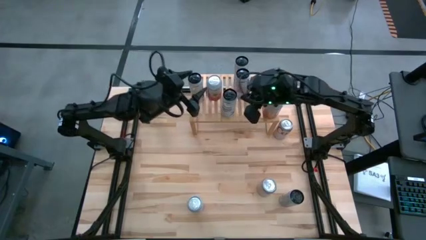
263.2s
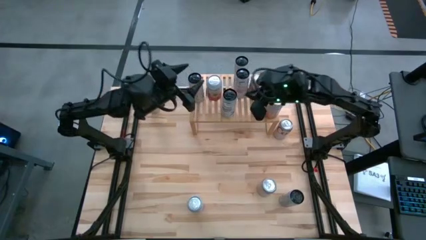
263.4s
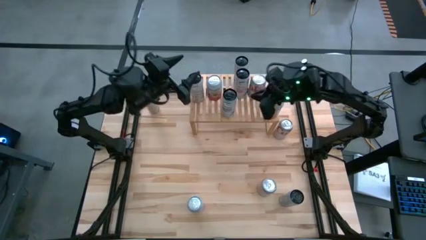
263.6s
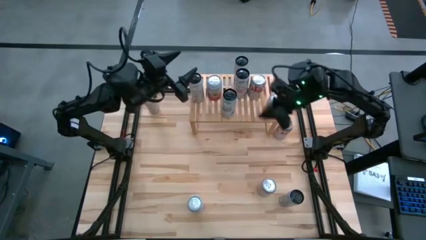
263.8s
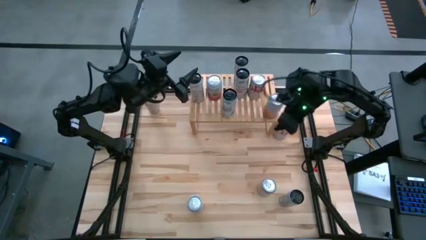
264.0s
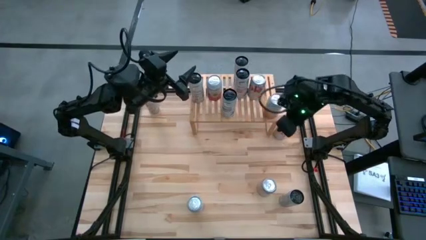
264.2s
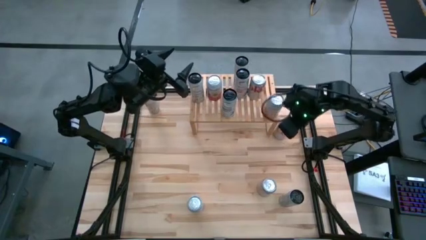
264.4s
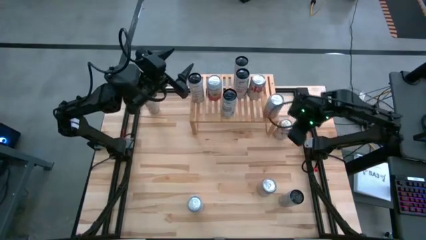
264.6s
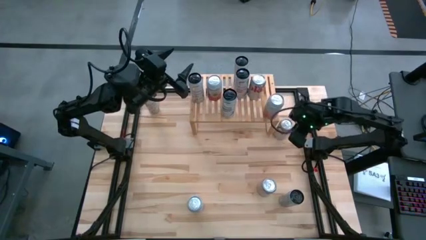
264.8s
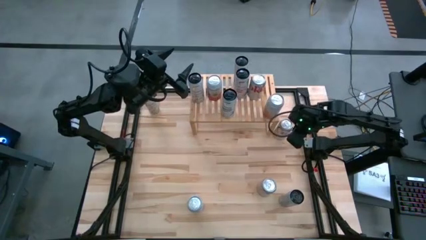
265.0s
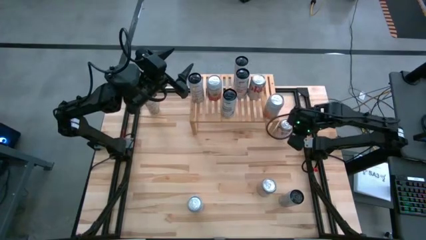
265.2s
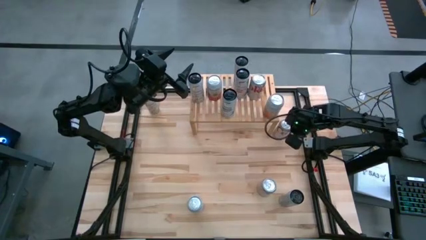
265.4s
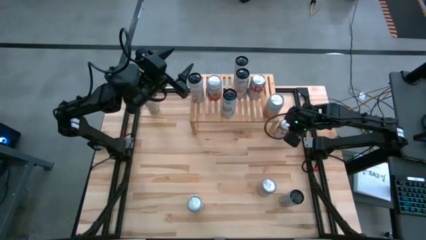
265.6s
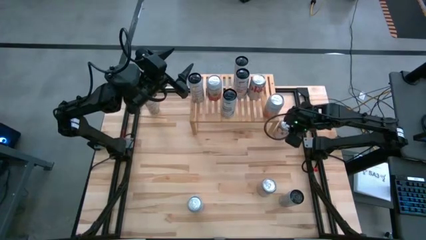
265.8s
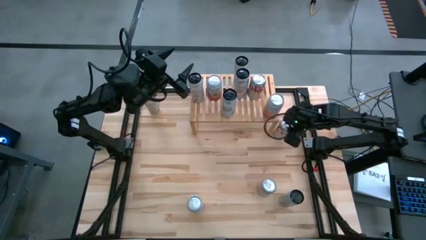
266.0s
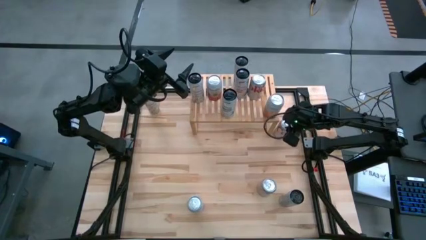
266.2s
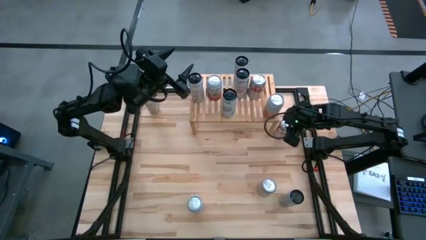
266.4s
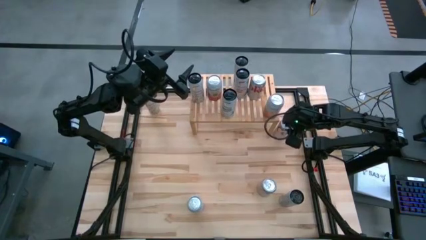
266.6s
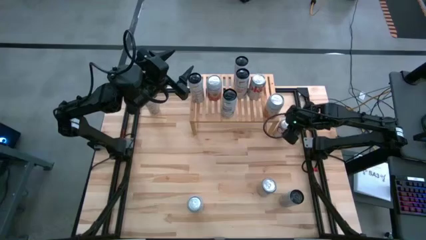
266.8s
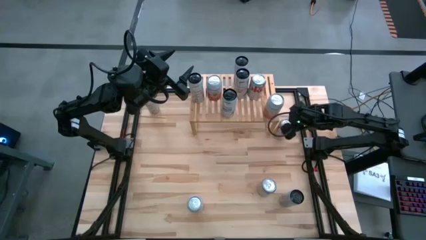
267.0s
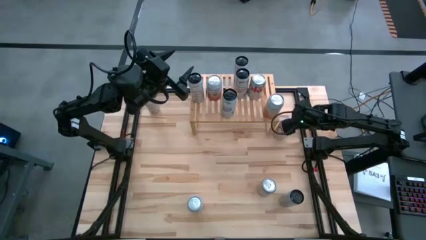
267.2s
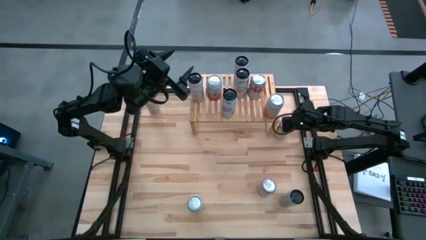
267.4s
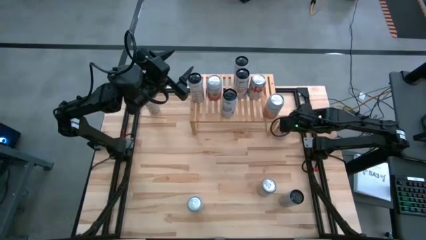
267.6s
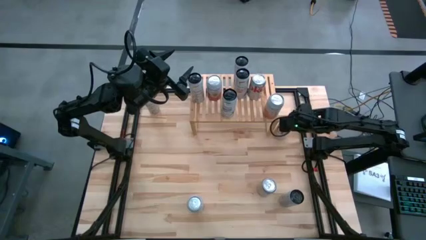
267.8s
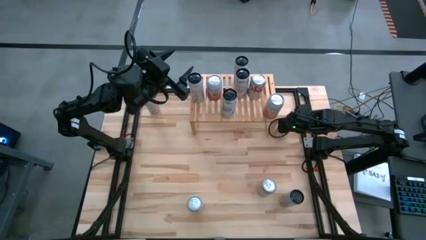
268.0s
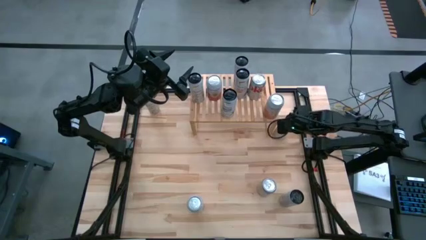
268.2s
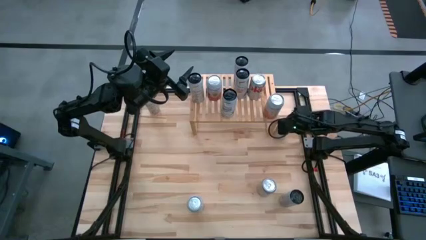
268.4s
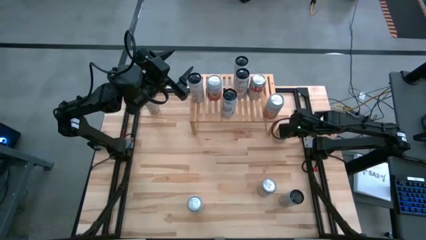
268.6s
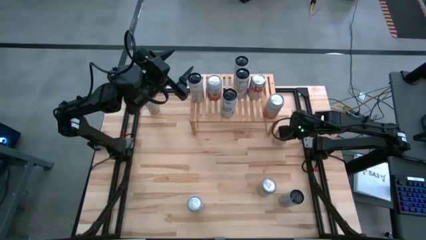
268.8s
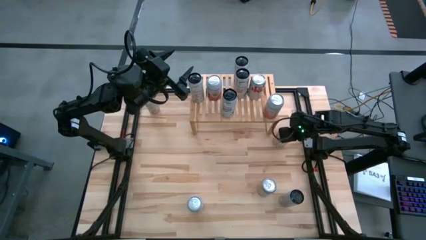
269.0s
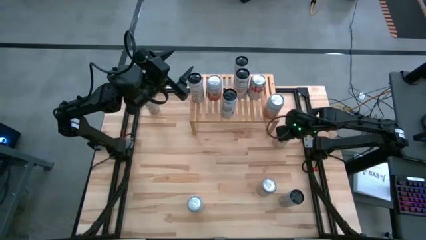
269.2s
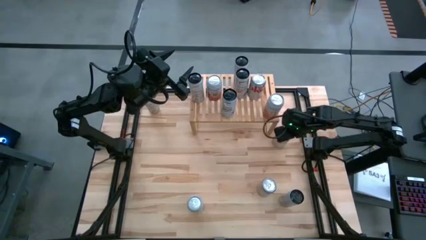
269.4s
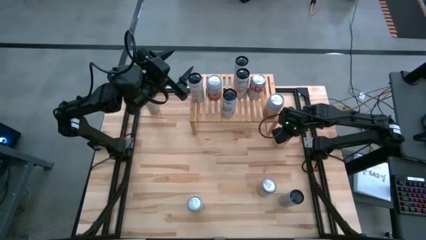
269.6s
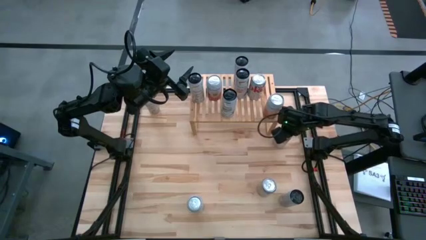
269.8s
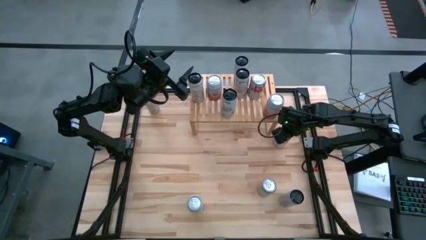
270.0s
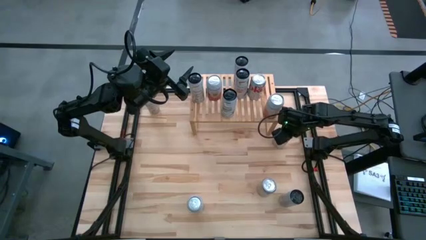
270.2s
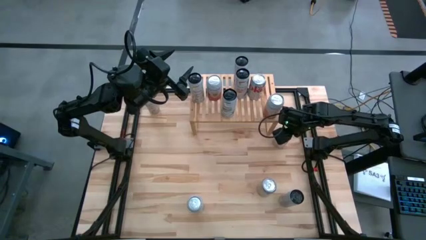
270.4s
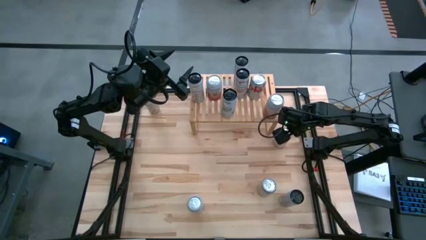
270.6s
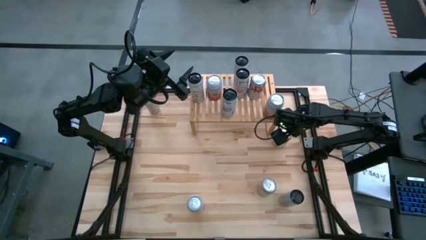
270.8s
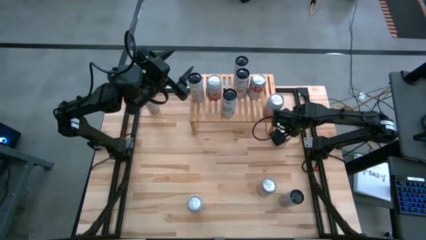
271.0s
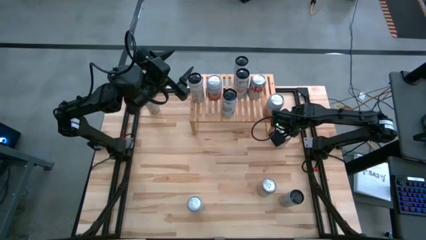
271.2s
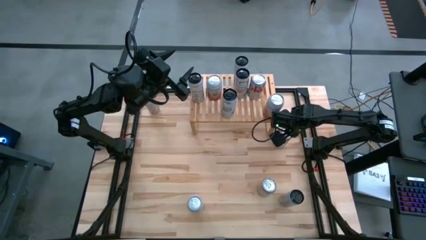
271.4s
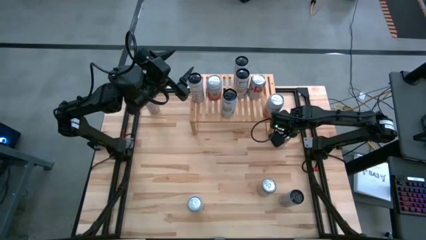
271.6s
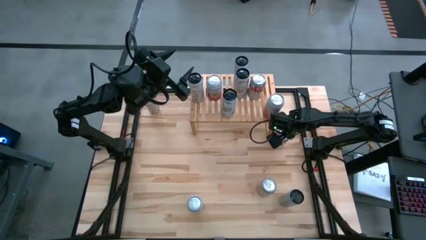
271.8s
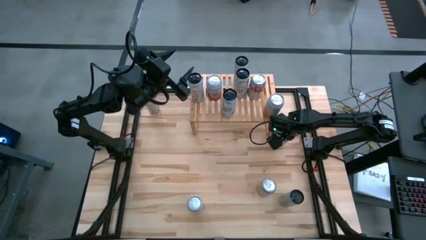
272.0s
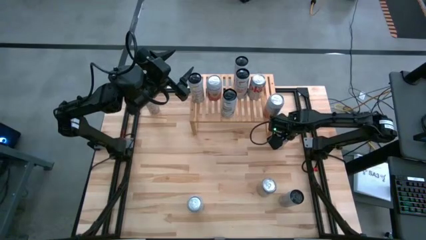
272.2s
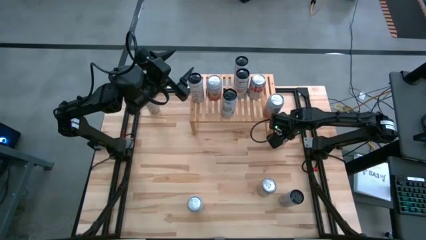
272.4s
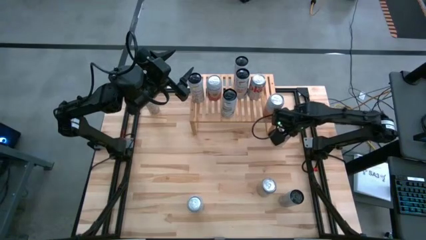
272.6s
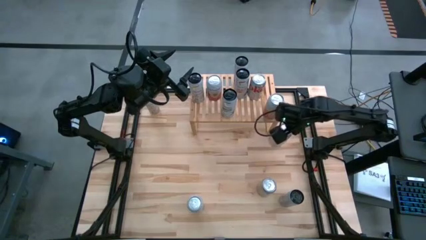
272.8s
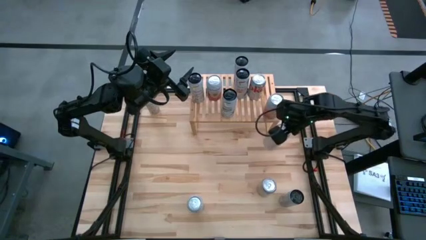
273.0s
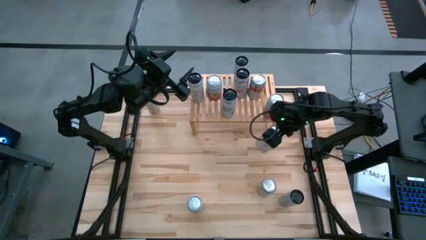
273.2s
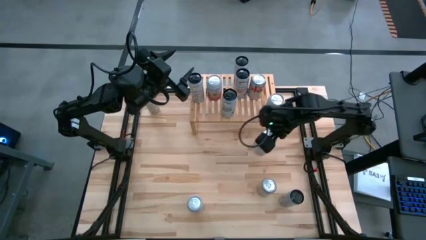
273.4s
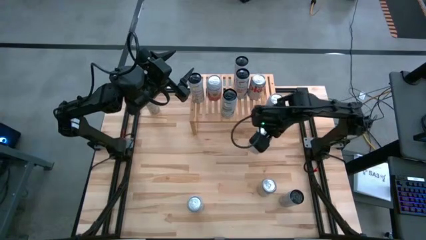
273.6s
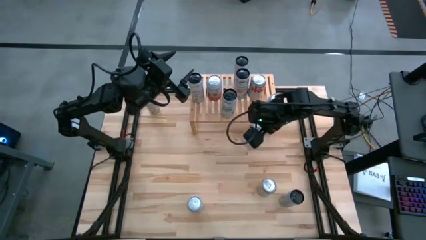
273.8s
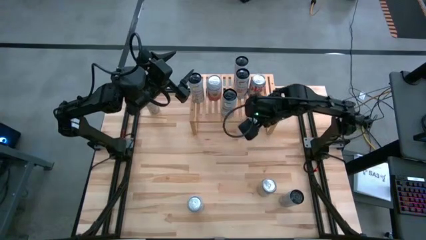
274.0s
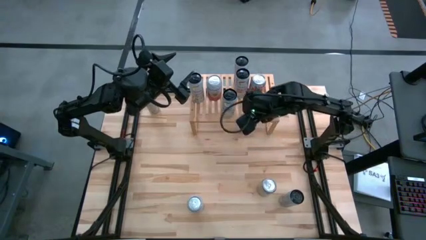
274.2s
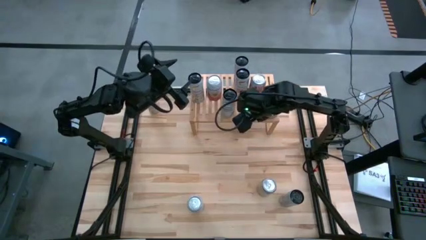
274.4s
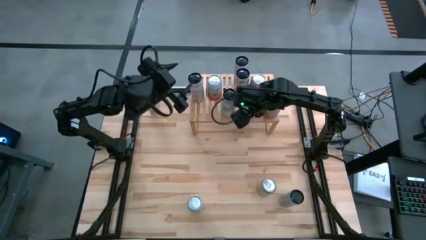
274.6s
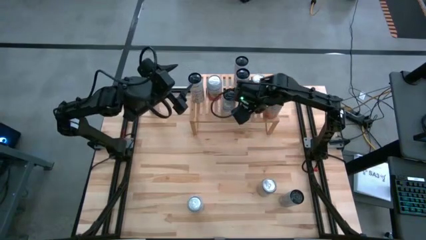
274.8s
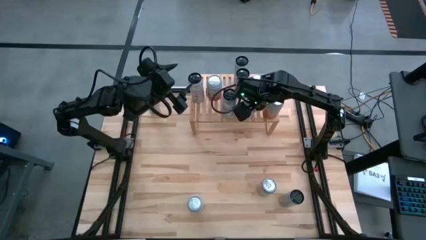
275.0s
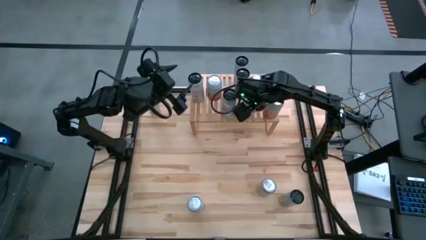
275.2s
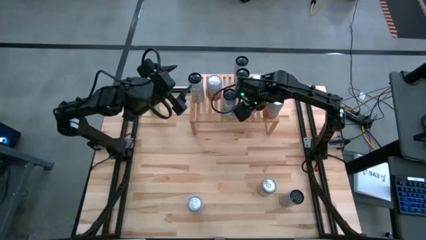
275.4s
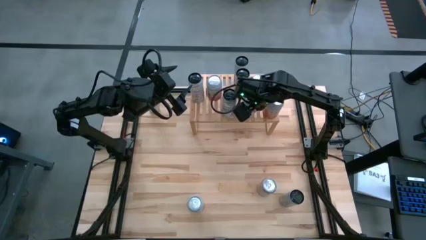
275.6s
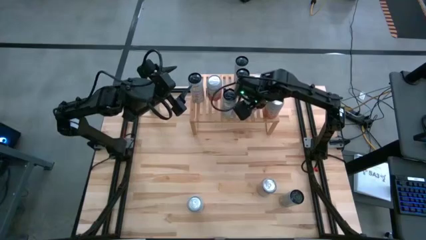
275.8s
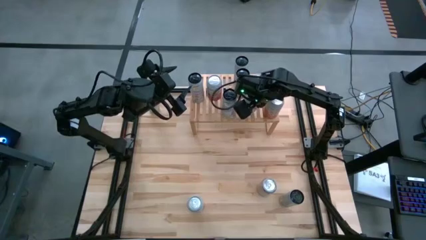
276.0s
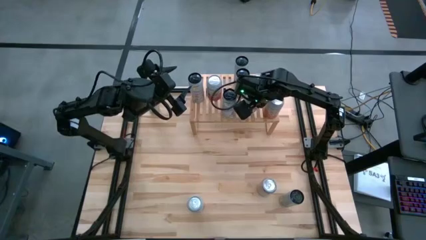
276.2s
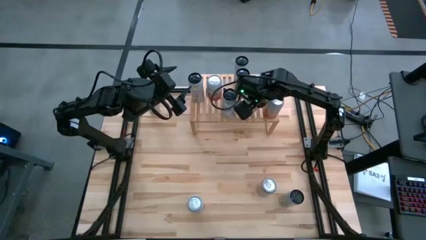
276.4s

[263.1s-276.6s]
Task: Place canned beverage on shelf
Put the top silver soda can on the shelf aligned with the other silver soda can

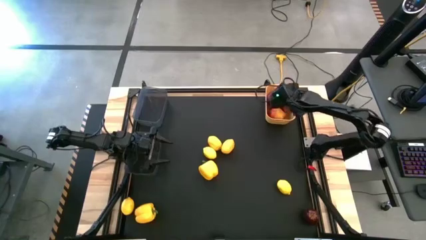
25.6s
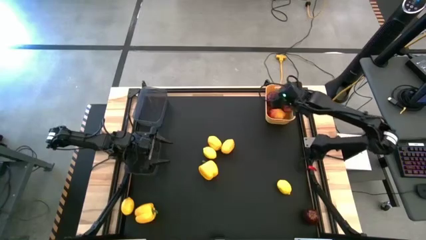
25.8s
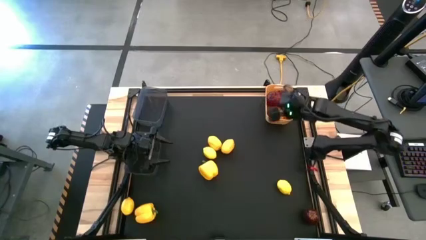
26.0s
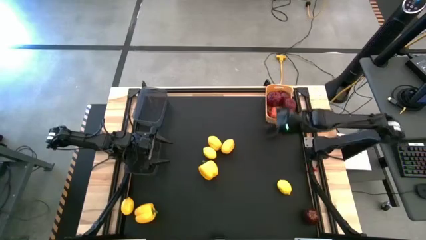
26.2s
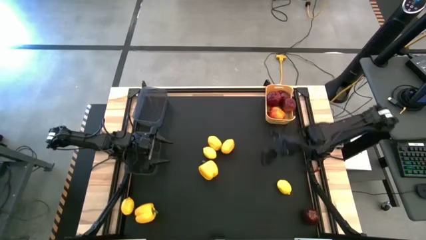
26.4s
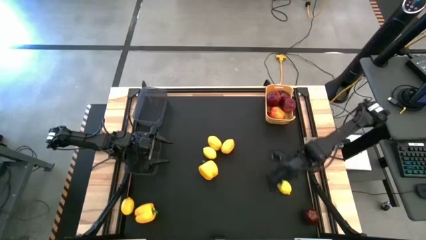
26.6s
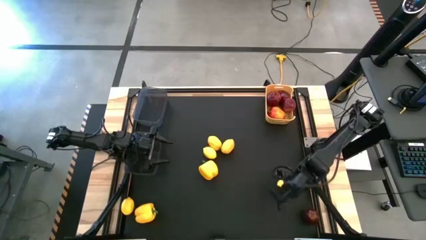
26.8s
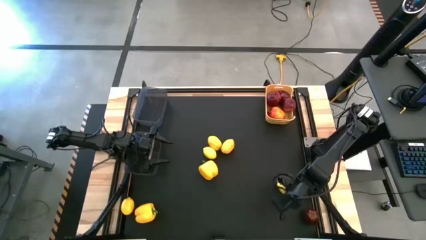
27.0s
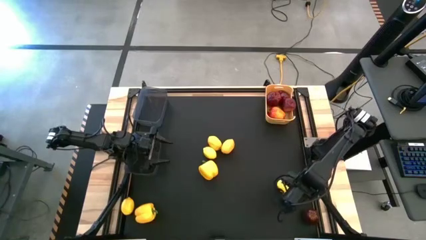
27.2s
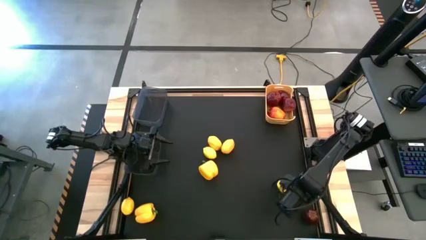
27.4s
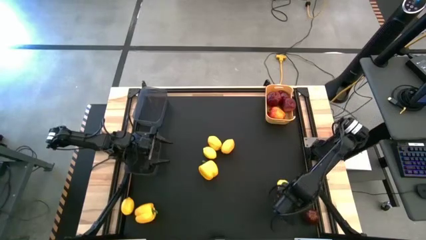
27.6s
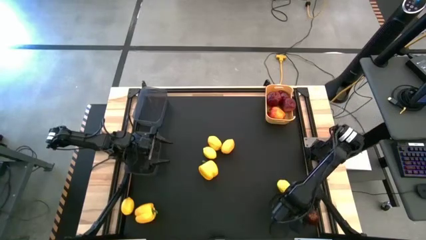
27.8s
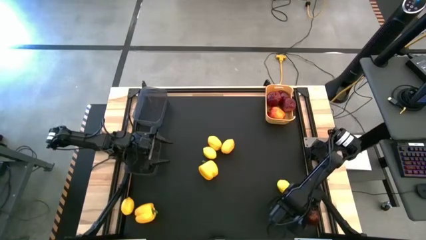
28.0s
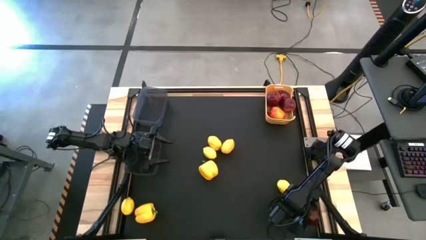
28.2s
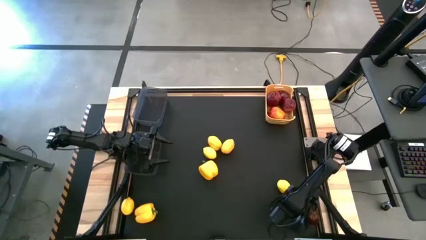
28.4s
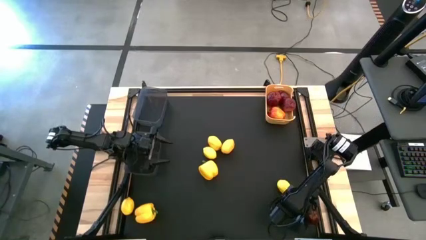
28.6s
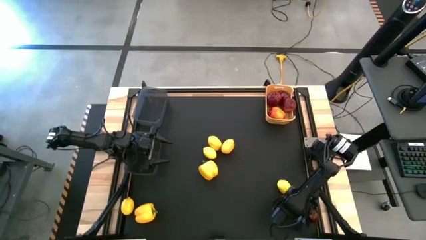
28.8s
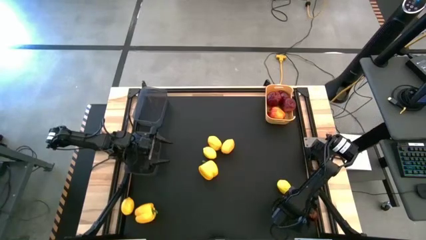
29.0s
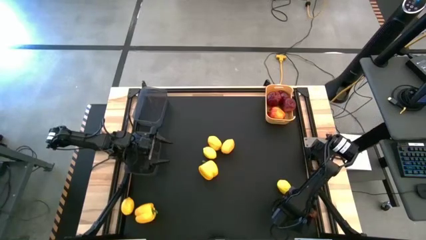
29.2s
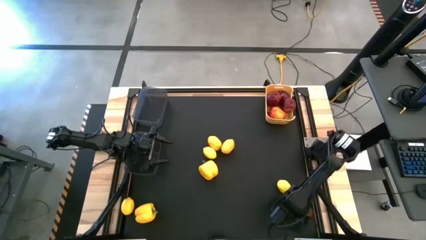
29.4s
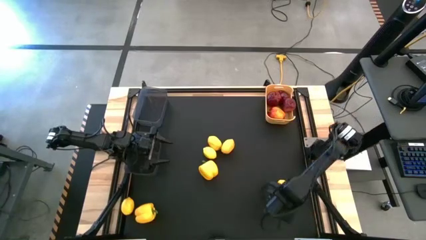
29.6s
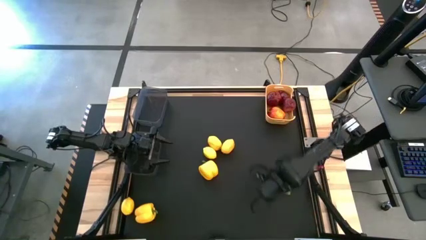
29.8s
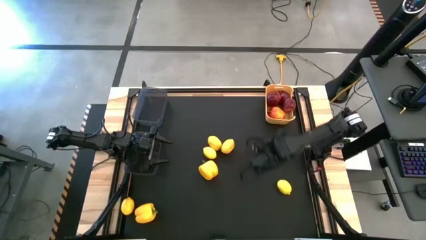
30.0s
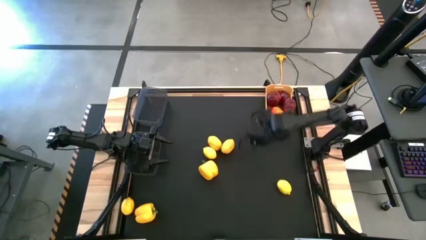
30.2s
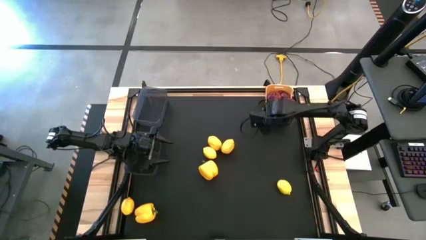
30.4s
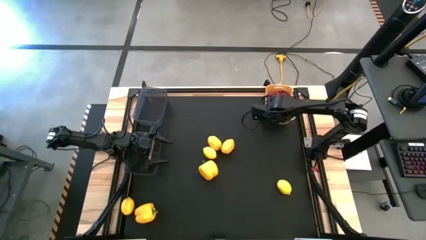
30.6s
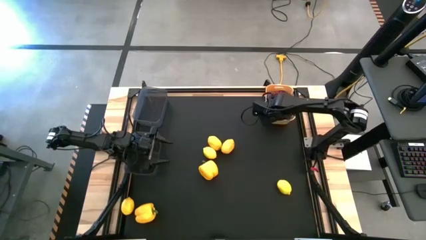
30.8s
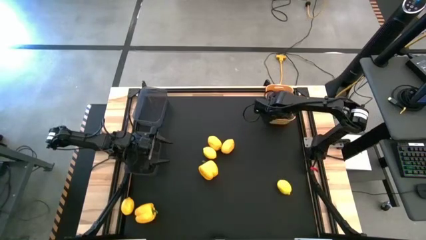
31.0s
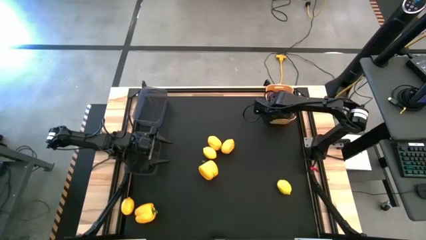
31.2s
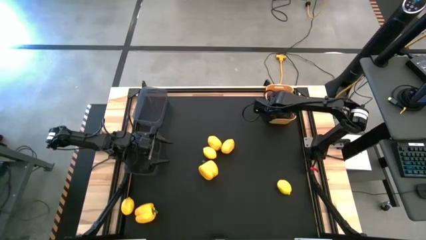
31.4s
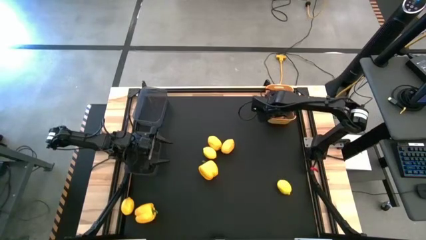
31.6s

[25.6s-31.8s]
Task: Sort produce into baskets
Put the apple into the yellow bin
